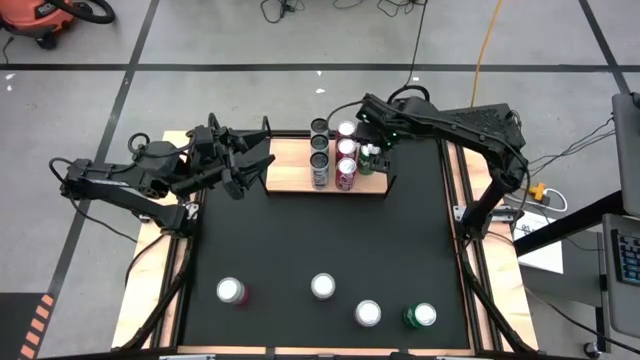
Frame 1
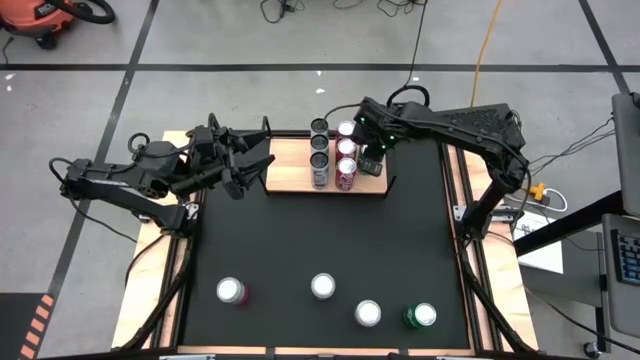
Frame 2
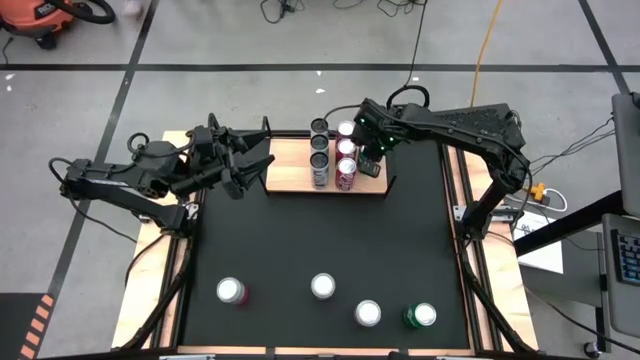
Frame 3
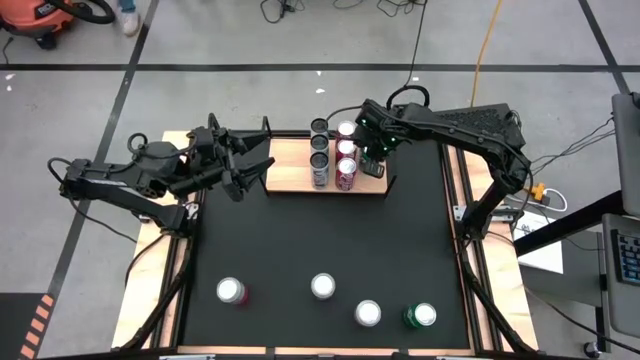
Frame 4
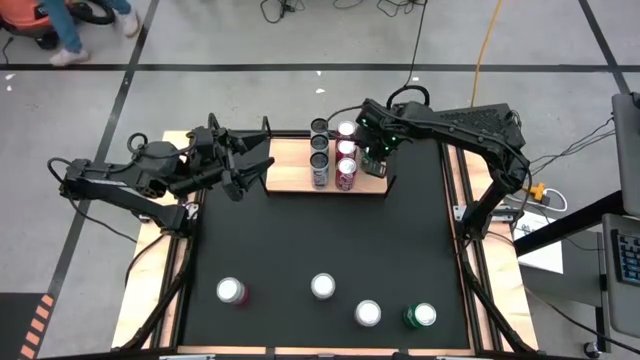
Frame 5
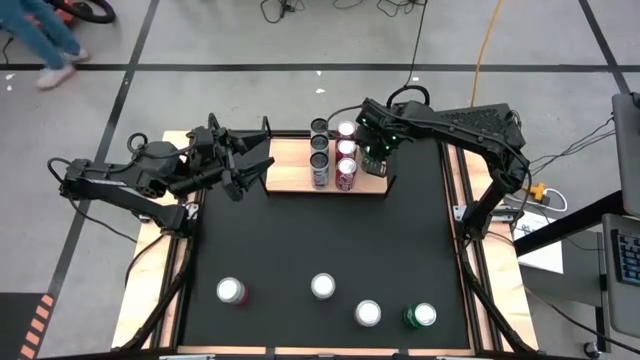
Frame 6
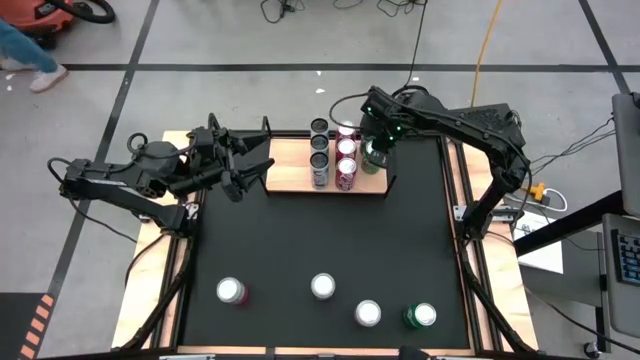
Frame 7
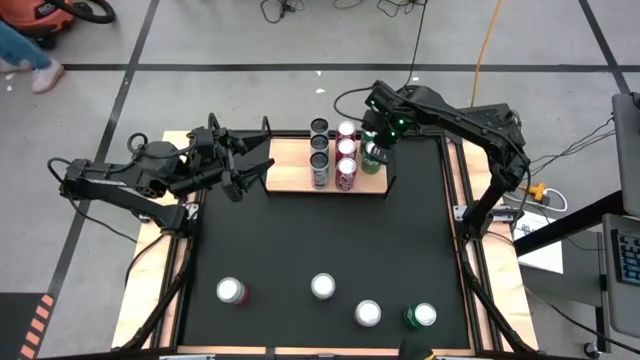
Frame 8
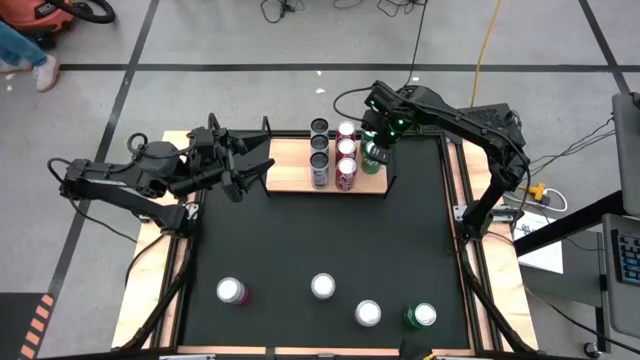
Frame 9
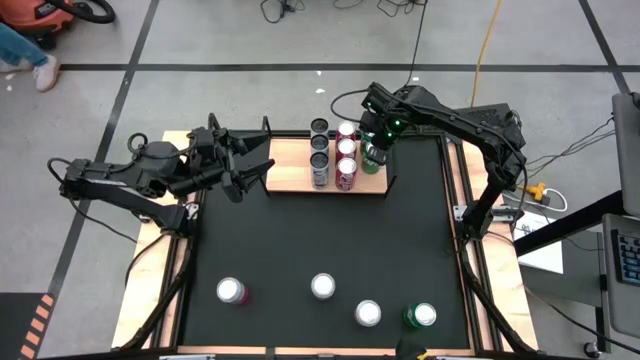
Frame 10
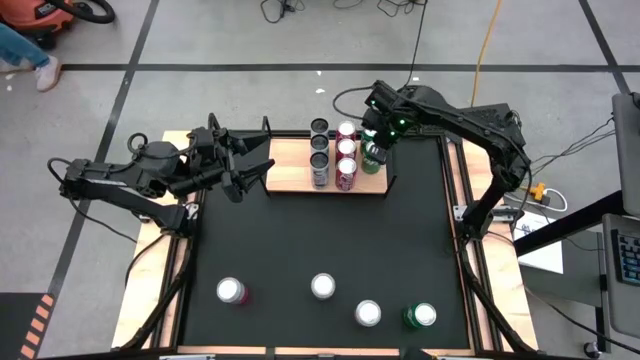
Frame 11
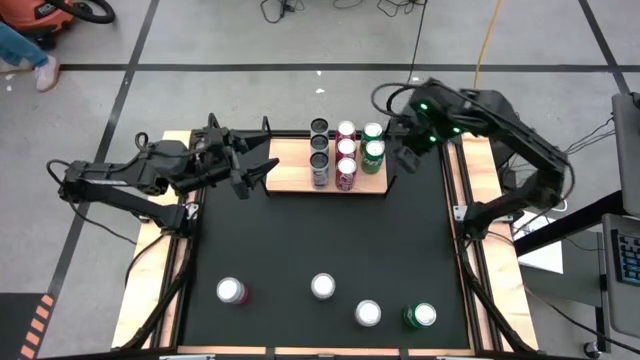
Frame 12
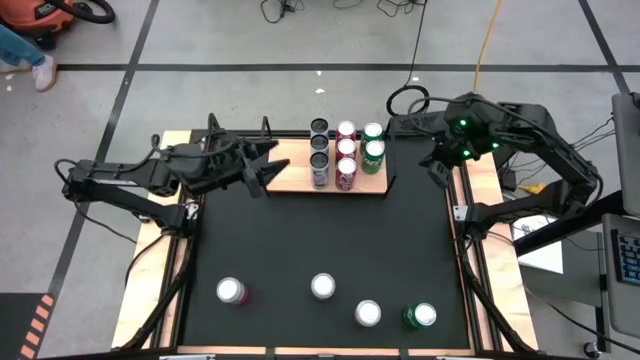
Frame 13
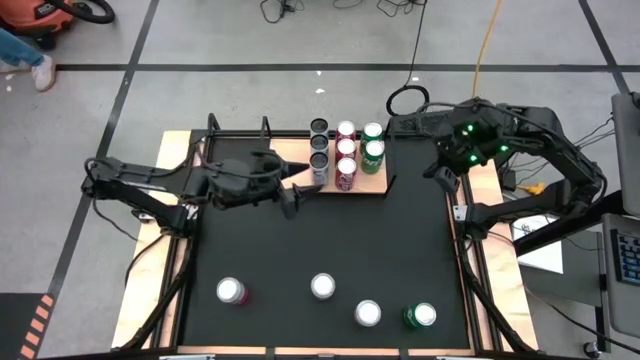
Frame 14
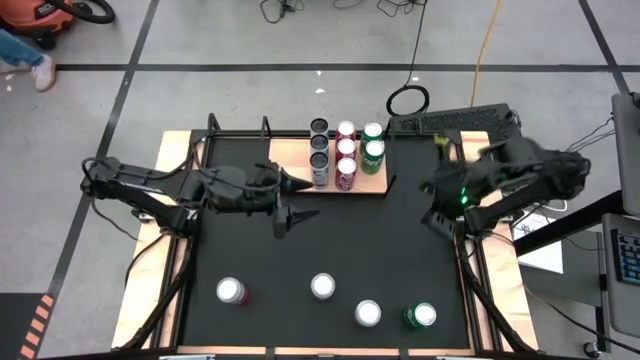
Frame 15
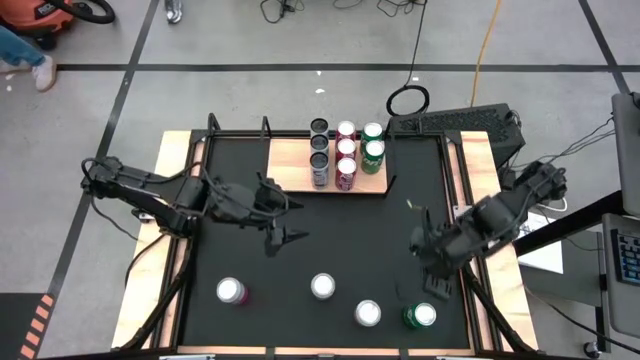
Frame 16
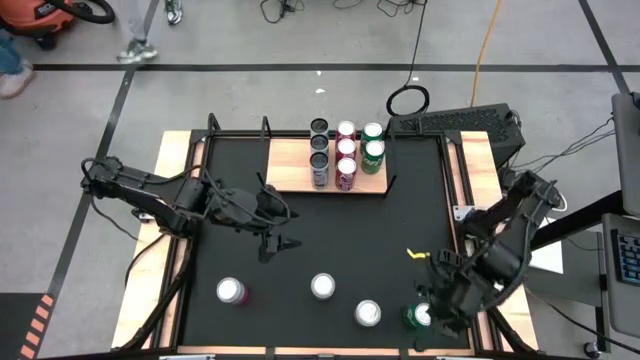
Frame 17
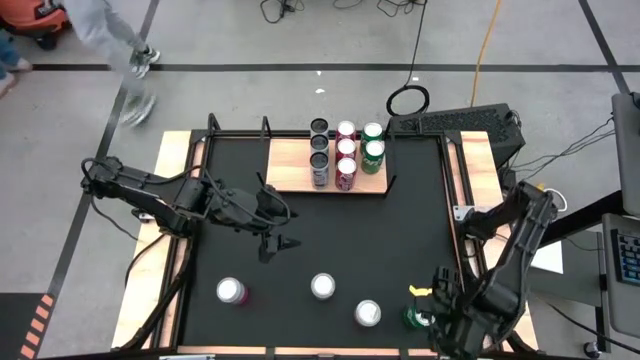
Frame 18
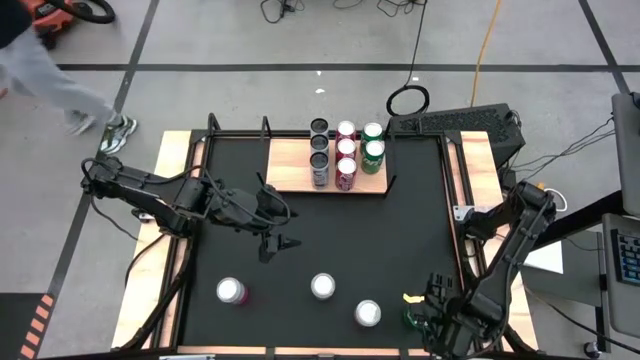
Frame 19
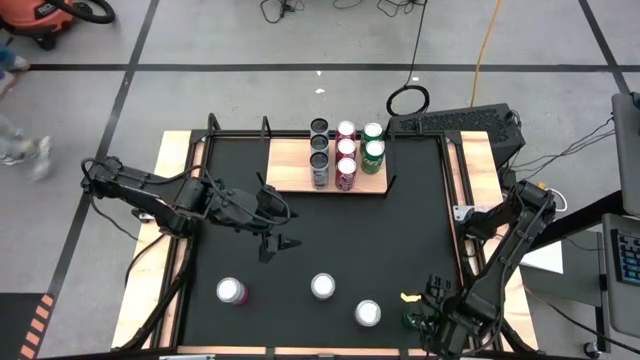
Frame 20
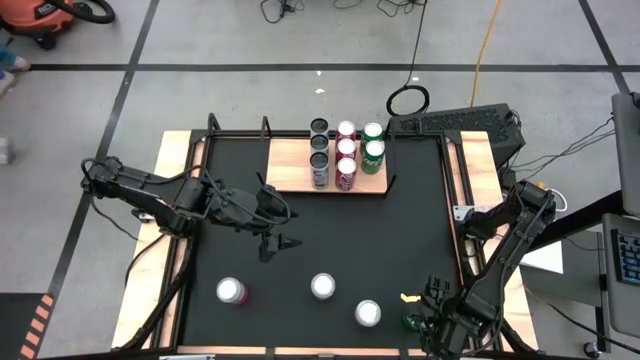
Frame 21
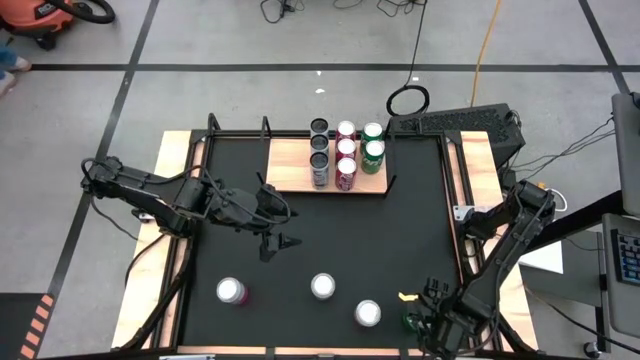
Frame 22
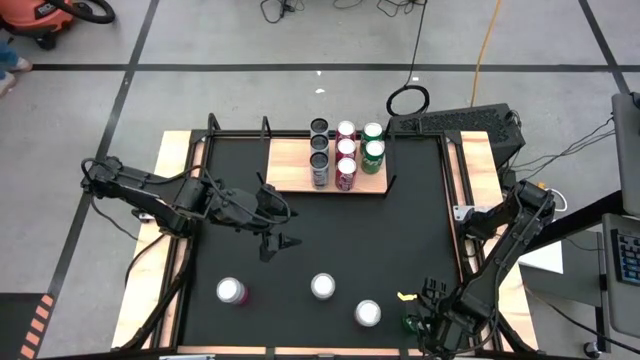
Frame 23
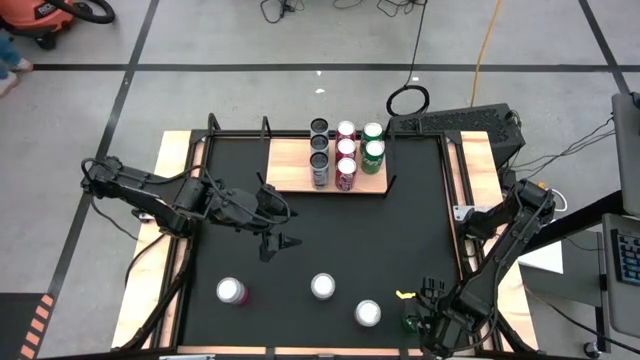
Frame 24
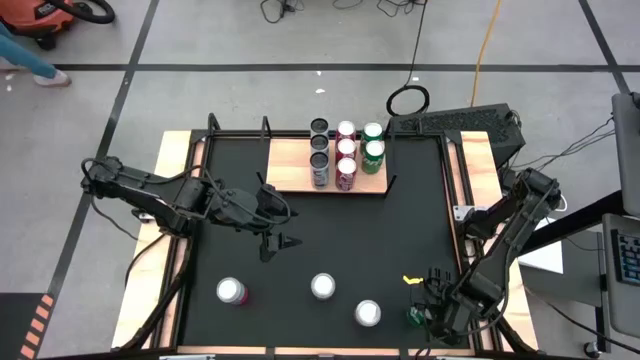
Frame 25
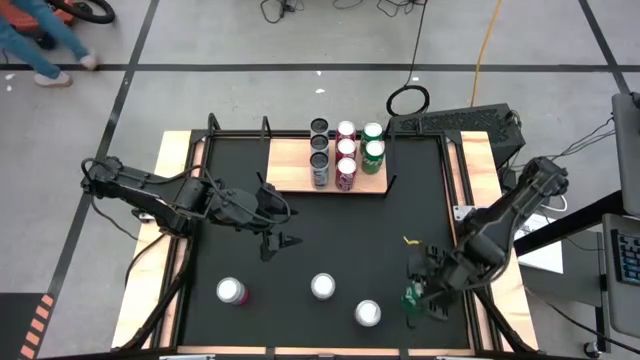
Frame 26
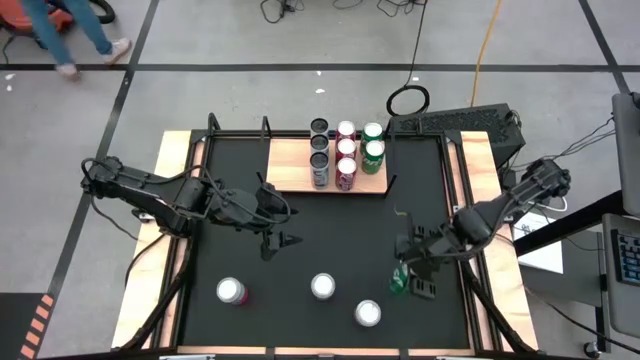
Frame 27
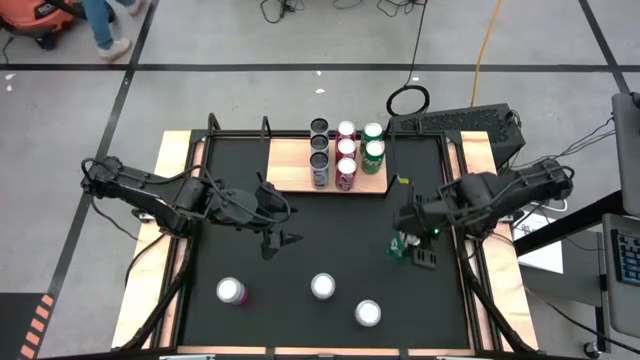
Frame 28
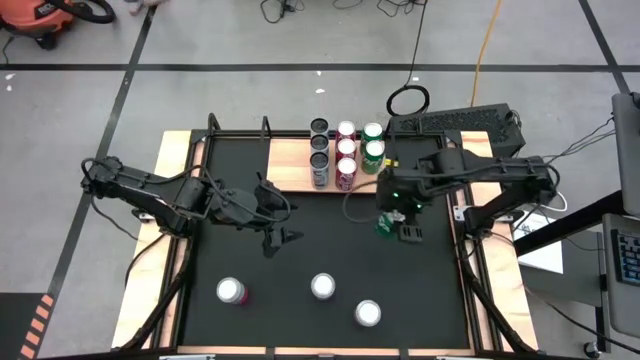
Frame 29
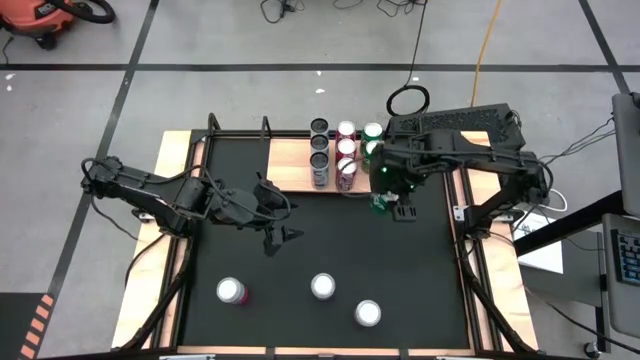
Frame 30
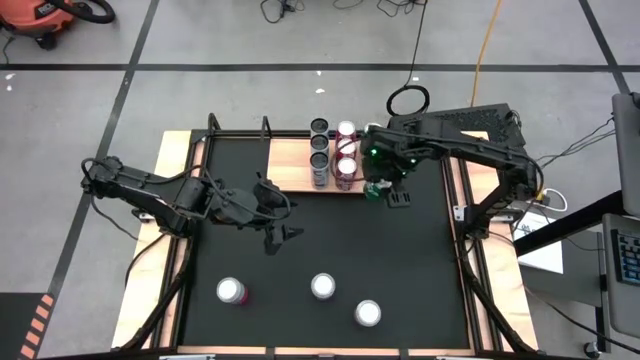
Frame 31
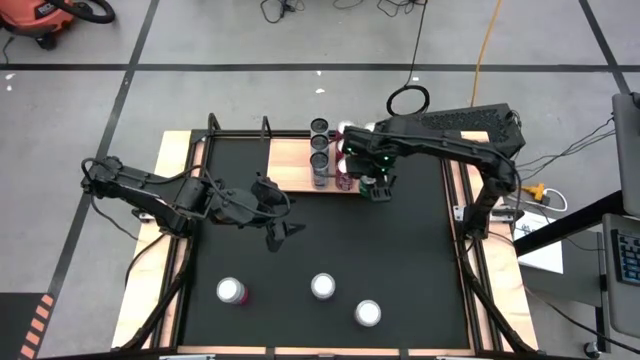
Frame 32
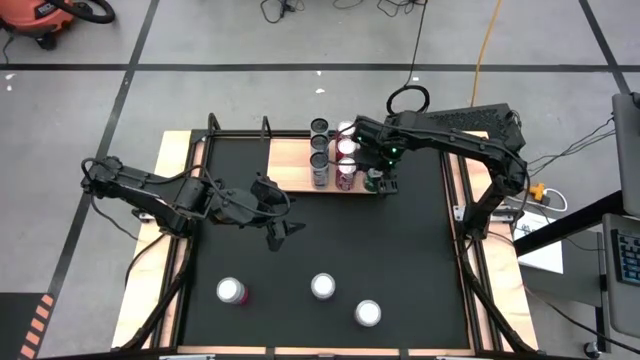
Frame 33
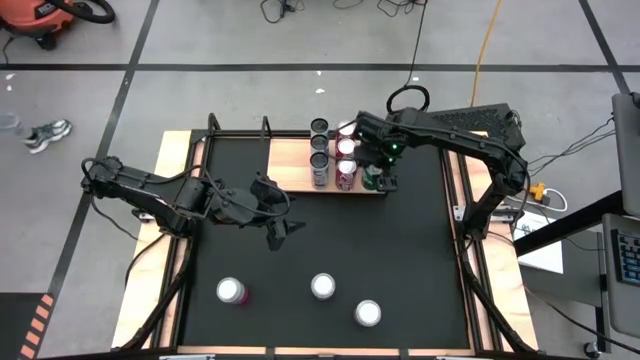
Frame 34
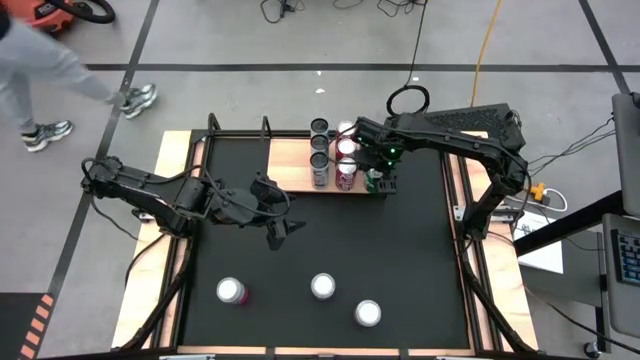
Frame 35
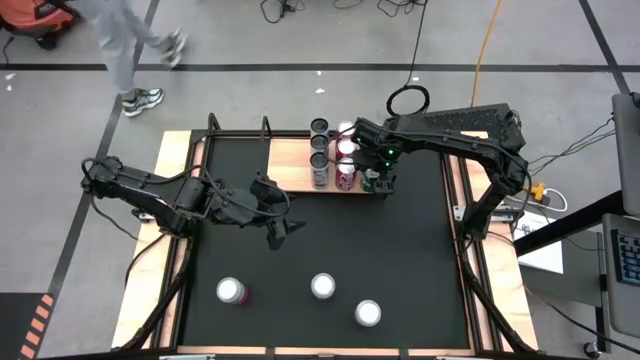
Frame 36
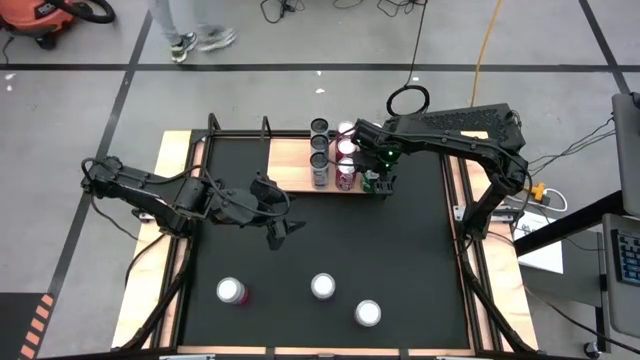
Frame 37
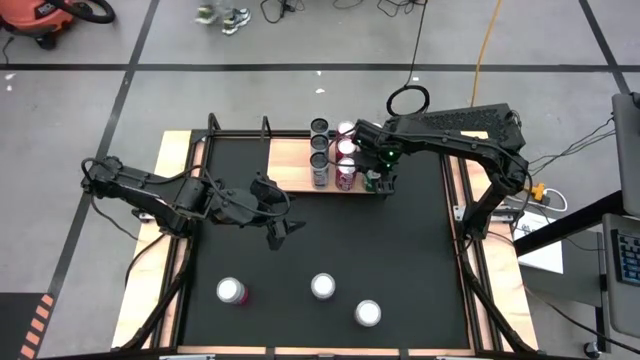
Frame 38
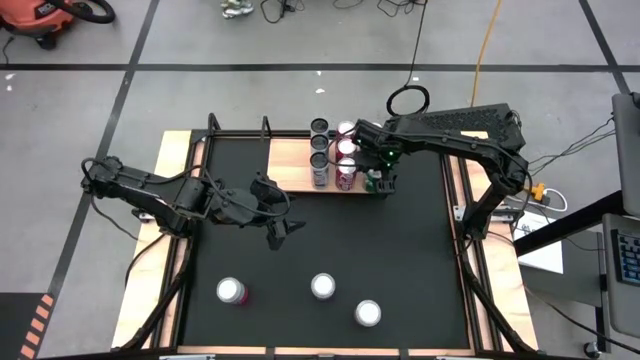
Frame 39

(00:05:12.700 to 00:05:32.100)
Task: Place canned beverage on shelf
Put the green soda can on the shelf

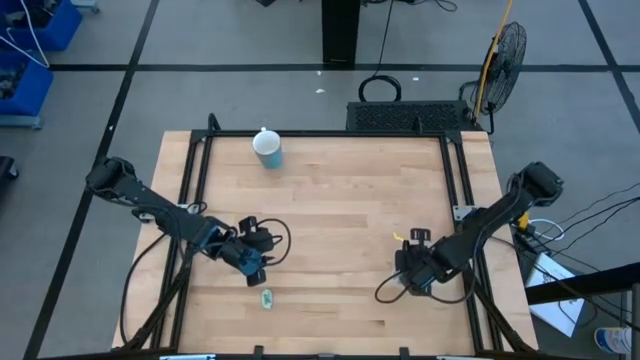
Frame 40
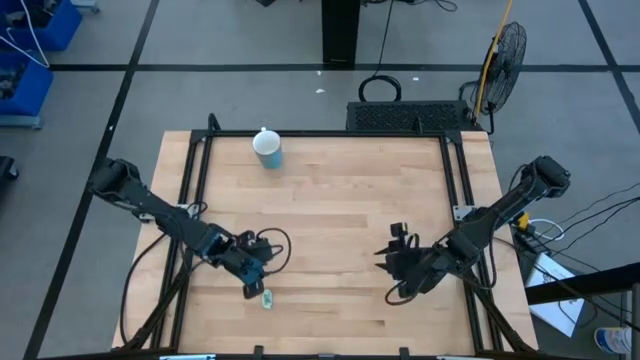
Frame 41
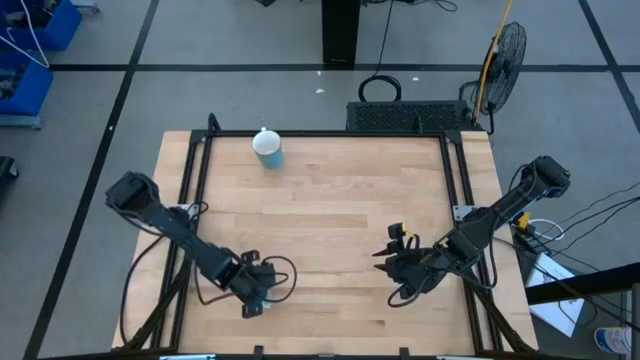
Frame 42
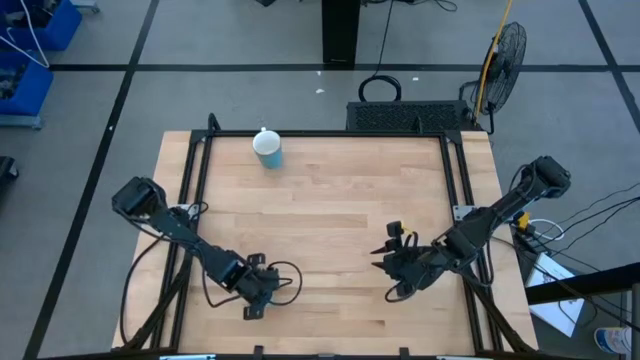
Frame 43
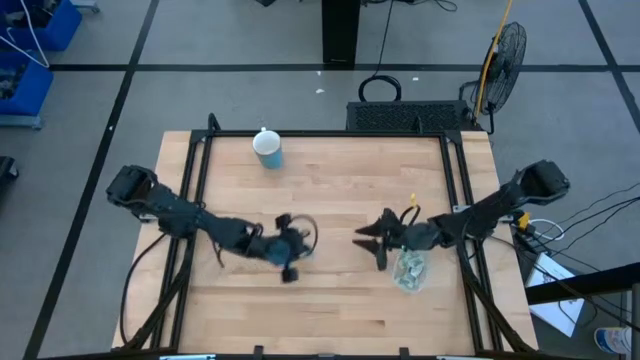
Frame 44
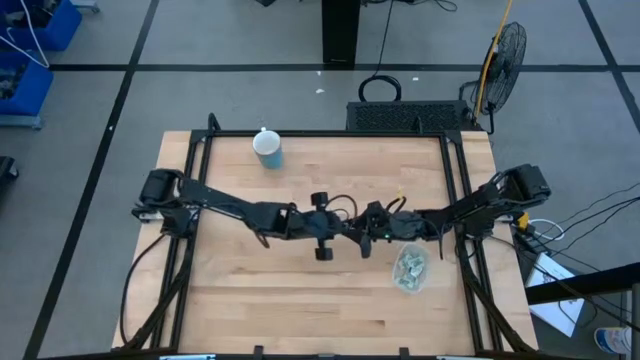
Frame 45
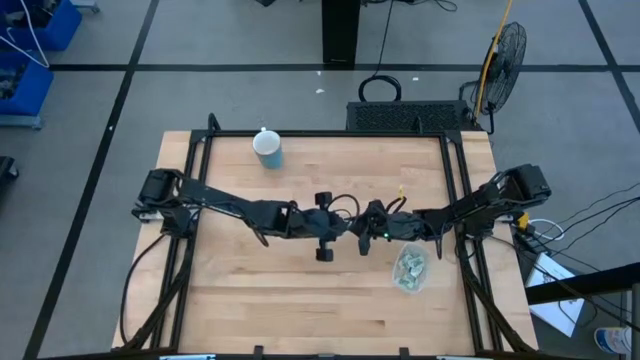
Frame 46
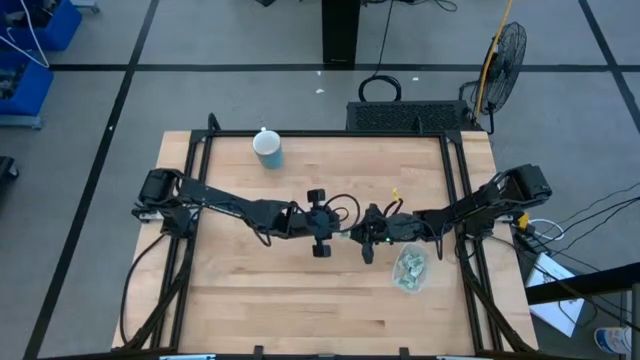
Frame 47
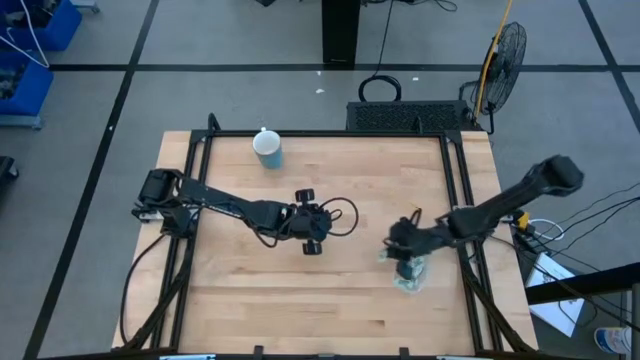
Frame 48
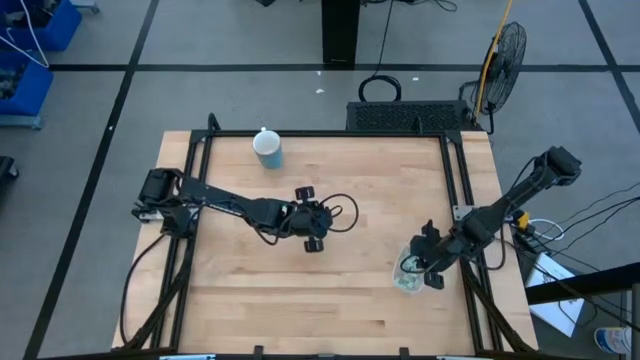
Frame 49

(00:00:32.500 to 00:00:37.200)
Task: Pick and place Stevia / Truvia into bins
Put the stevia packet into the transparent container
